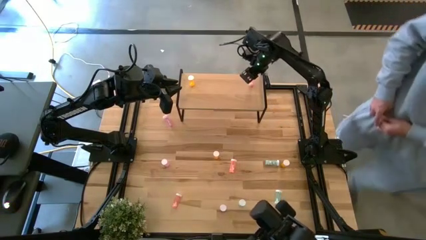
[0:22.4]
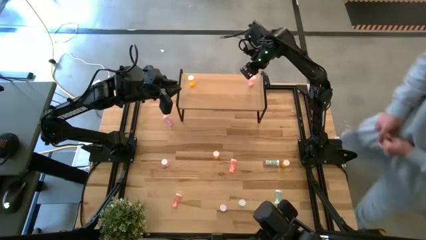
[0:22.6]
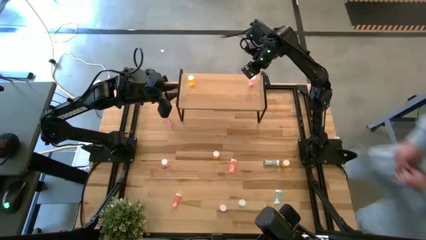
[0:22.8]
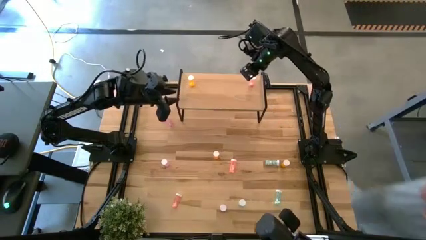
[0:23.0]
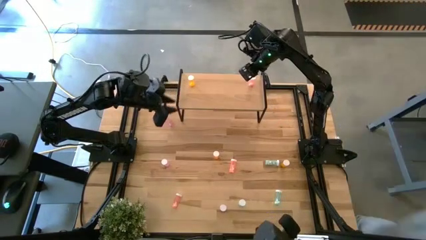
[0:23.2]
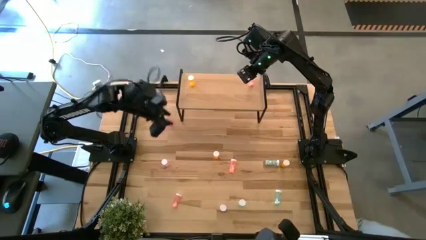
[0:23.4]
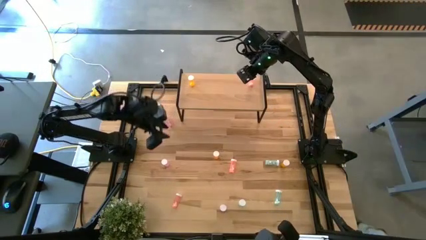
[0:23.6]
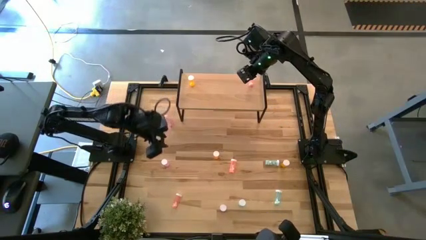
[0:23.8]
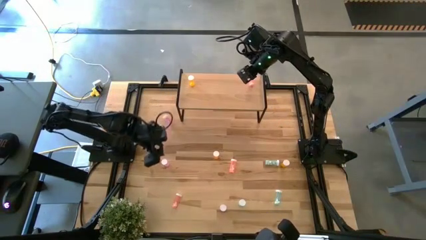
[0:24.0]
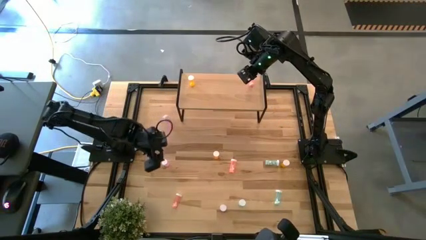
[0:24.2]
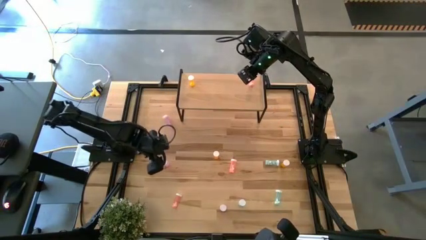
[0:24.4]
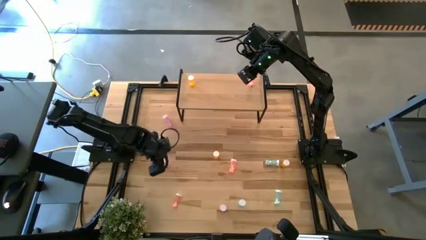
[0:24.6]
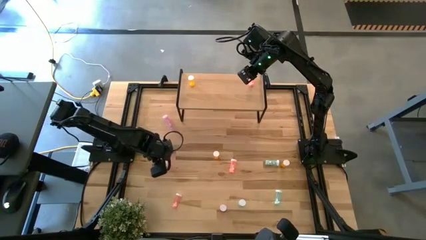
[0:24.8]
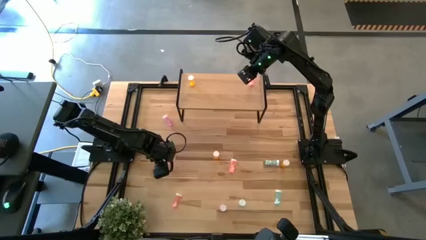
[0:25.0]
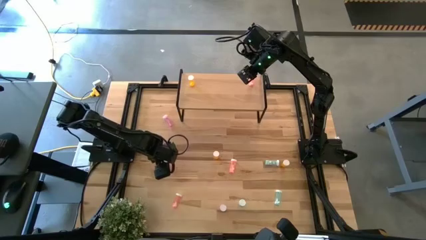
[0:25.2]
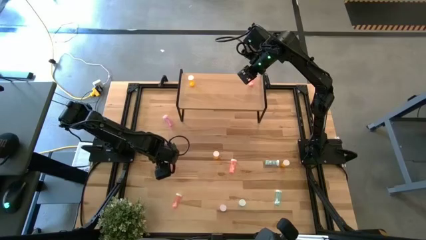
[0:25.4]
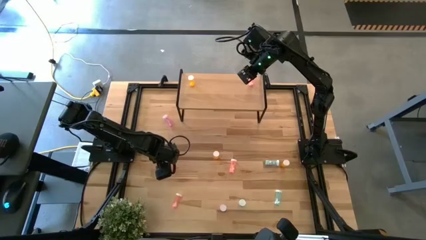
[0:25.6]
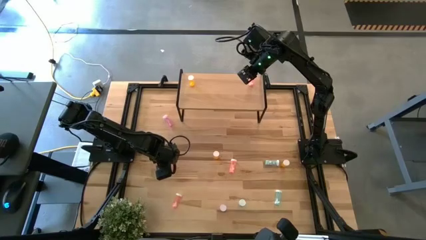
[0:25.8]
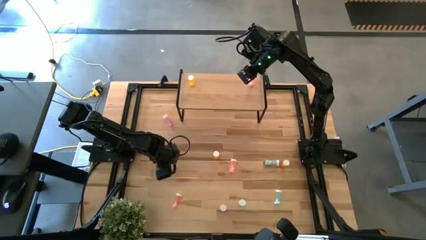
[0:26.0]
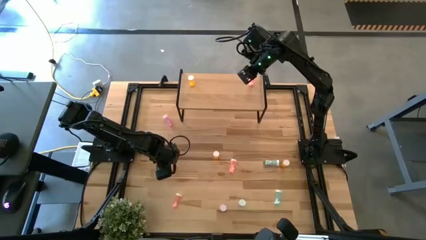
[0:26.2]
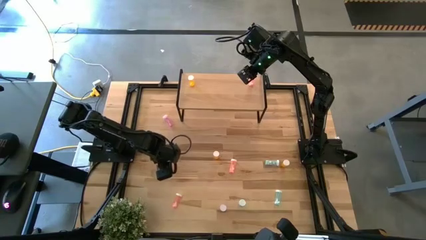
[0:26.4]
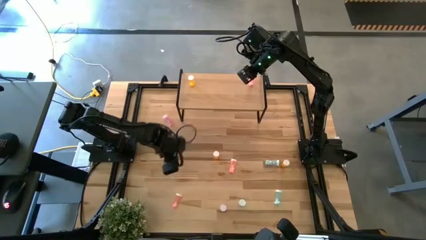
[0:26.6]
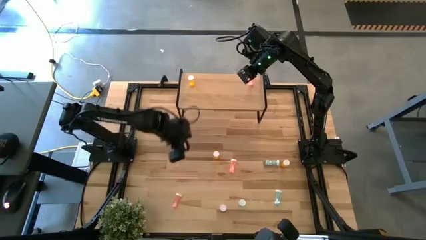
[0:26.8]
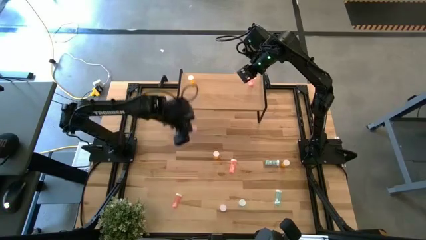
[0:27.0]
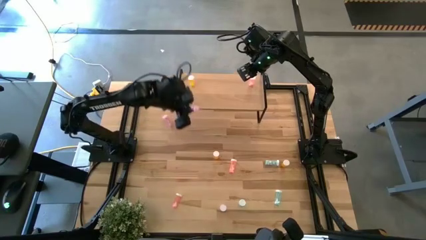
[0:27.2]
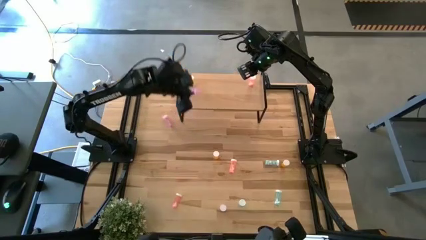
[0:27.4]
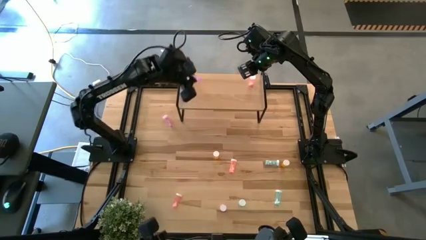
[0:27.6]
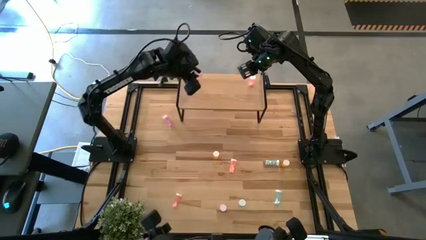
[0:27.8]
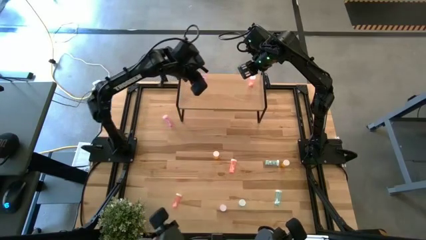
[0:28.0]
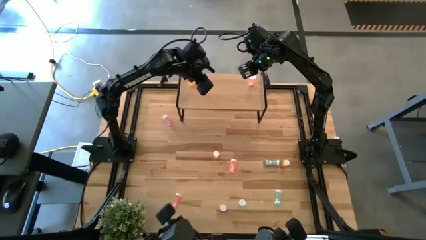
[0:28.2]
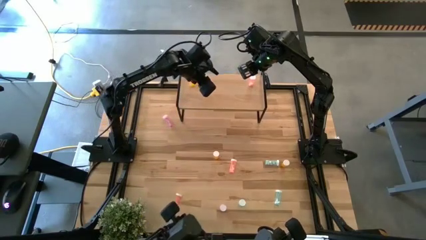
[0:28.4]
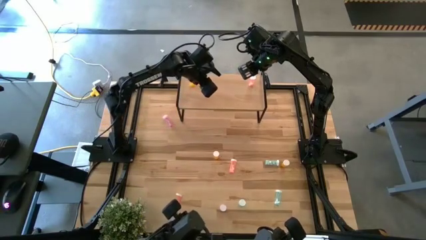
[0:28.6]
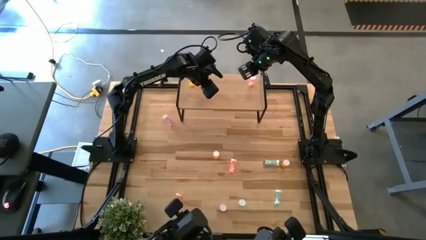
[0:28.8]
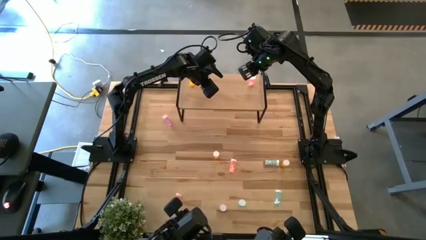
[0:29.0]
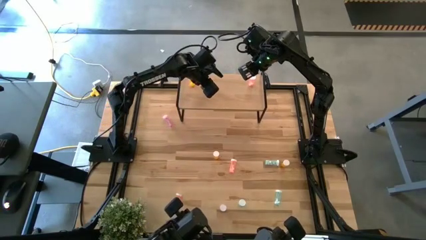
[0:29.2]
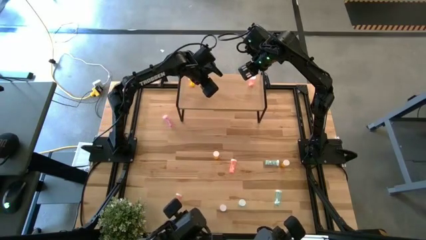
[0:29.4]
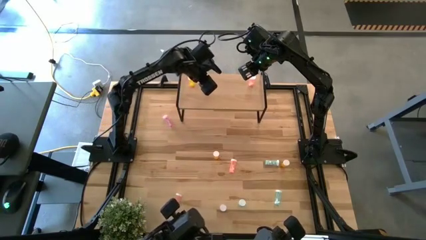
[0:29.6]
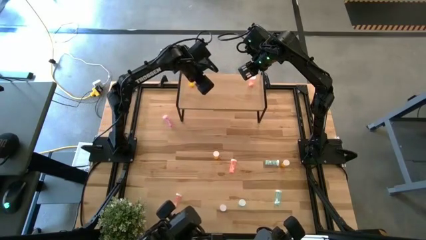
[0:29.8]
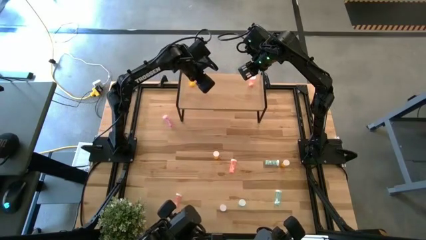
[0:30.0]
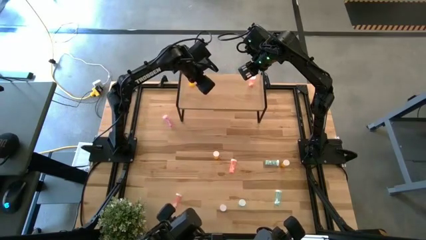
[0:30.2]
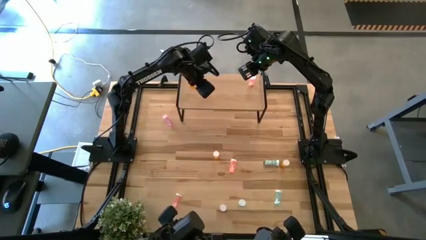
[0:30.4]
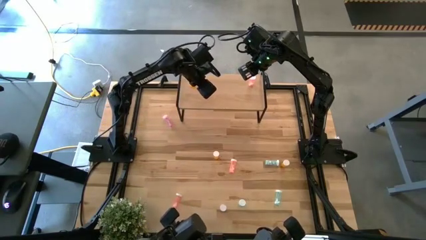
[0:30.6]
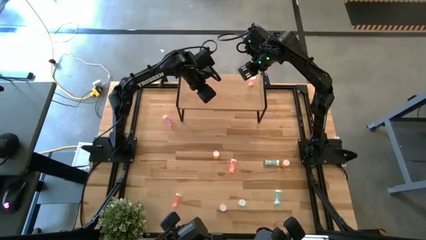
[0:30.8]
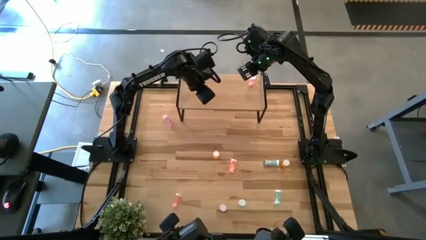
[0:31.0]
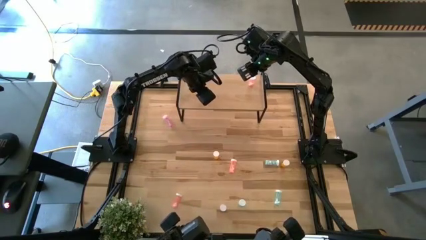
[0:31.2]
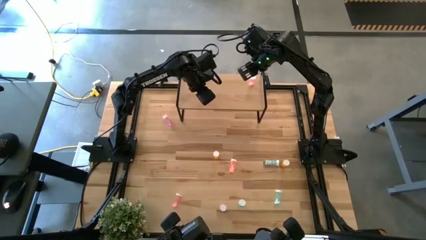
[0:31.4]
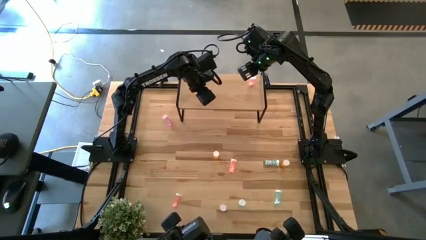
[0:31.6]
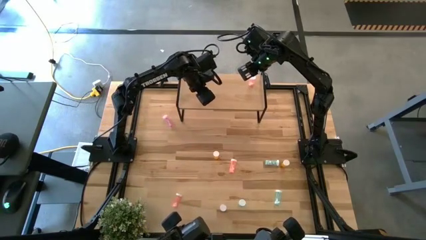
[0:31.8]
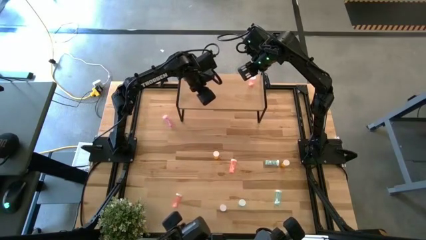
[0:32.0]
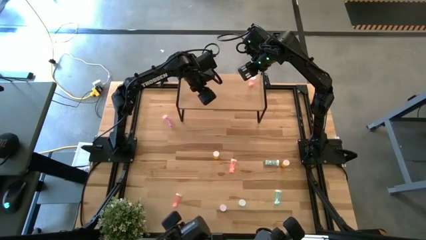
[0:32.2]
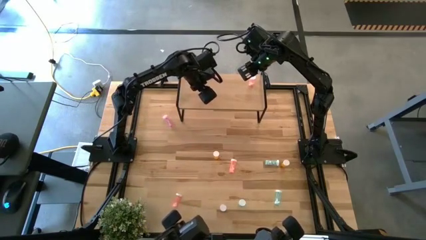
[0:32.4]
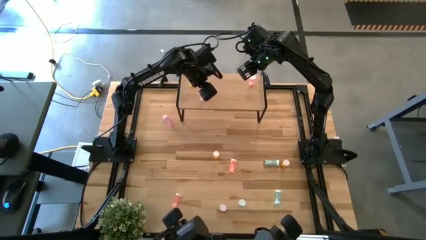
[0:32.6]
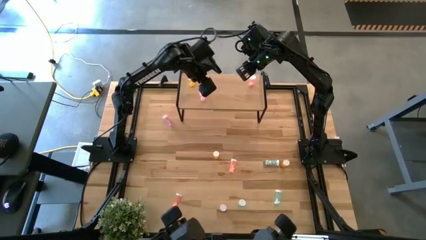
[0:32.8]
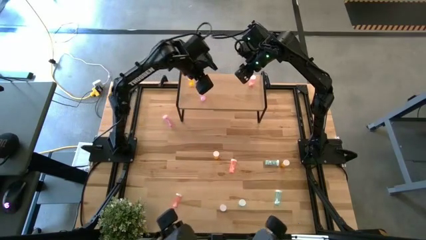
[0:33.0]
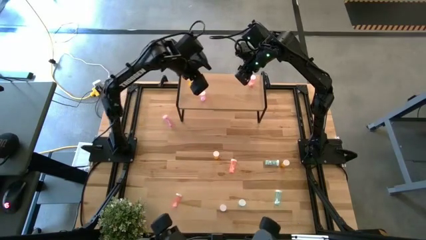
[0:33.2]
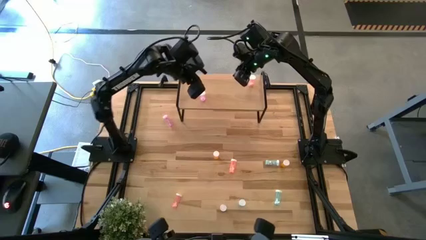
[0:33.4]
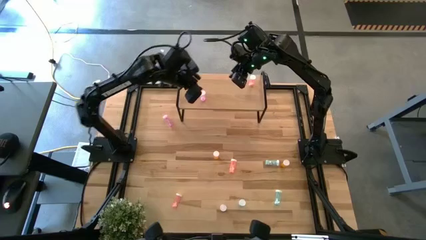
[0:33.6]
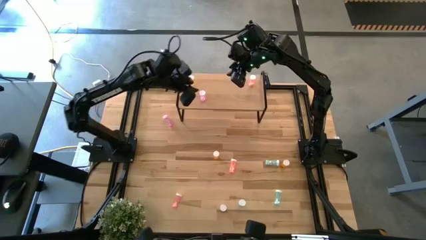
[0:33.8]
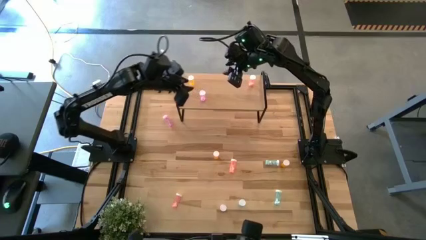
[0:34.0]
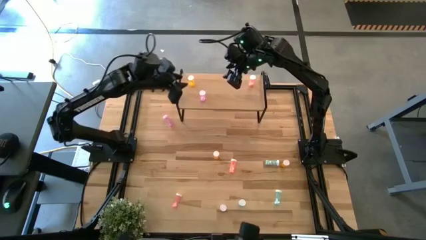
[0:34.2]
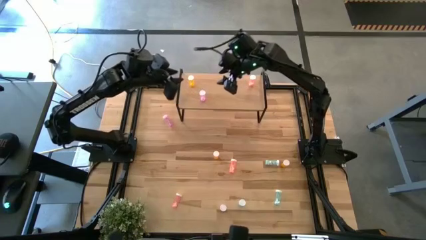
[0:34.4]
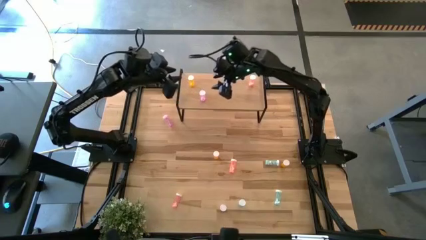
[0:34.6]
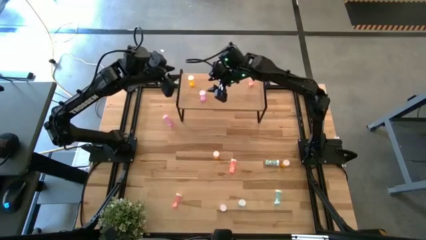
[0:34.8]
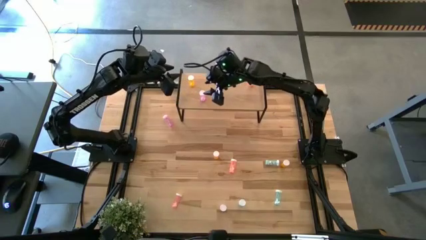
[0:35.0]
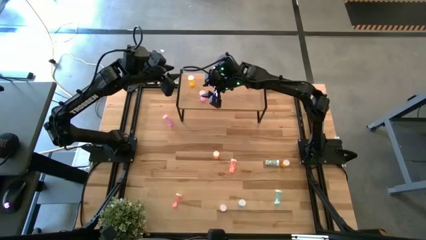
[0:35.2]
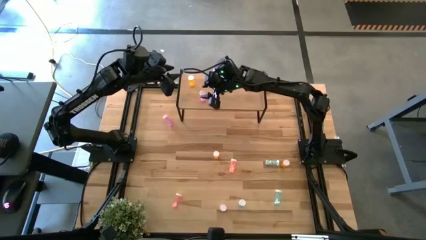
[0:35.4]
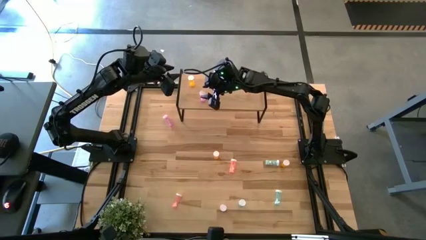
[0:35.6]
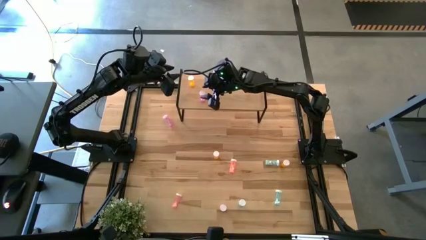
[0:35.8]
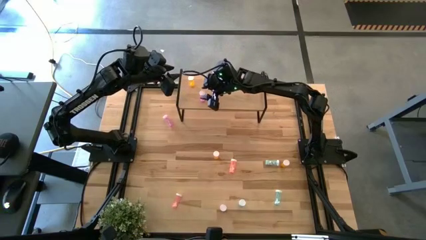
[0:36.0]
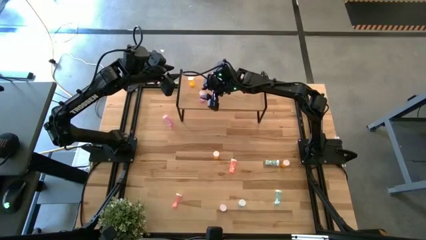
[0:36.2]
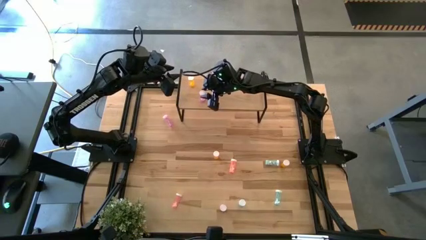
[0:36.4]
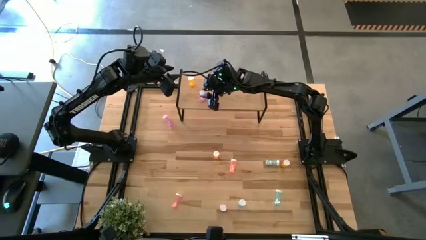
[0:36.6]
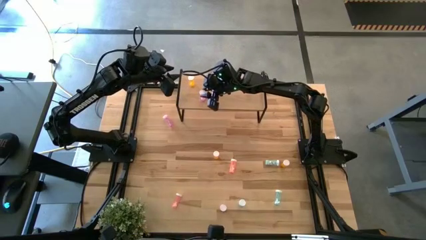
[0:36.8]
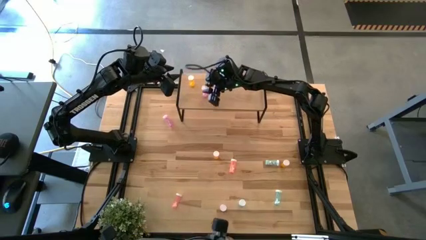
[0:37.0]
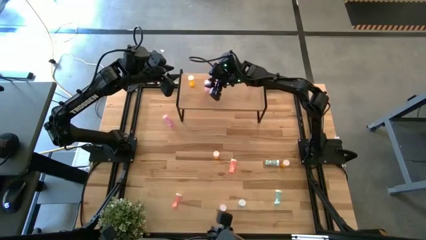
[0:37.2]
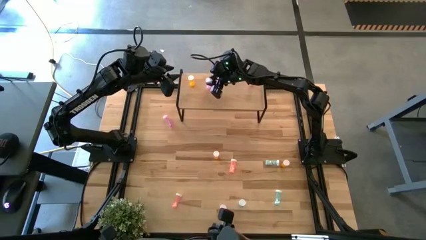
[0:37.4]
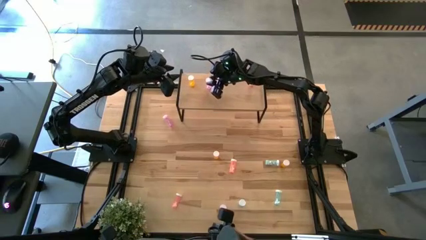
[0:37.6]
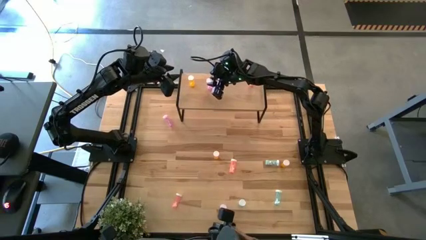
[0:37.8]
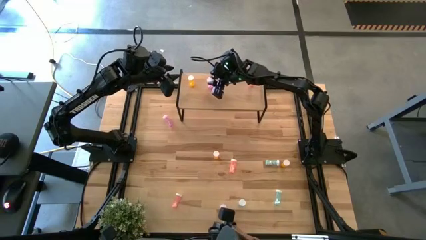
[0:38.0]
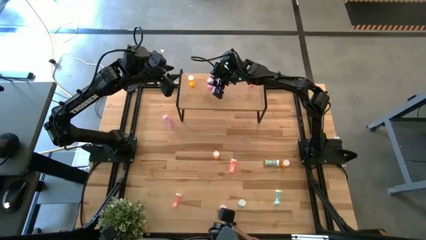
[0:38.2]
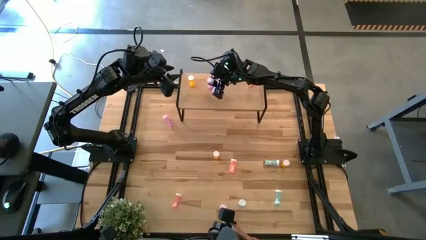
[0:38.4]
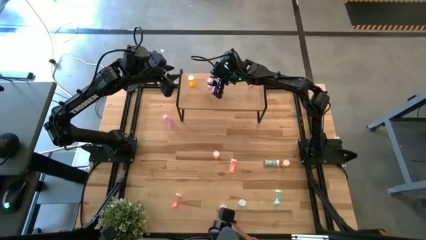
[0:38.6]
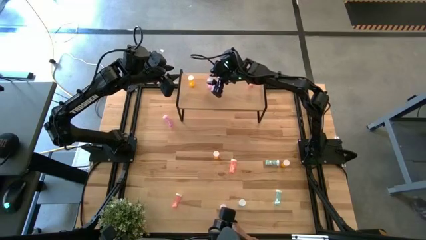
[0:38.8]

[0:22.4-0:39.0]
Task: Pick and place medicine bottles onto shelf by color
Put the middle purple medicine bottle on the shelf
